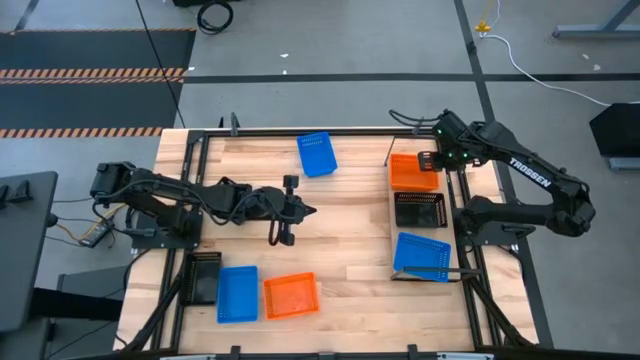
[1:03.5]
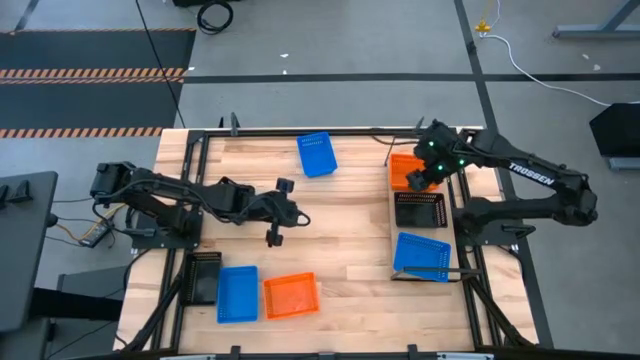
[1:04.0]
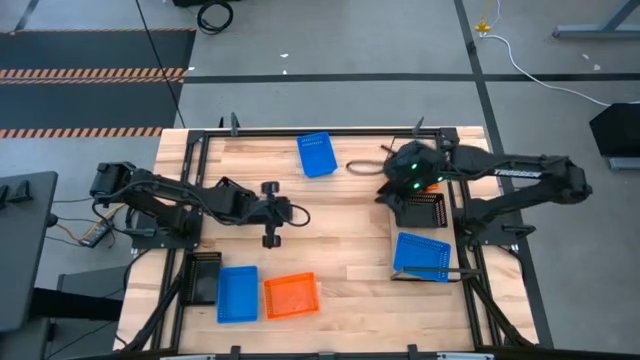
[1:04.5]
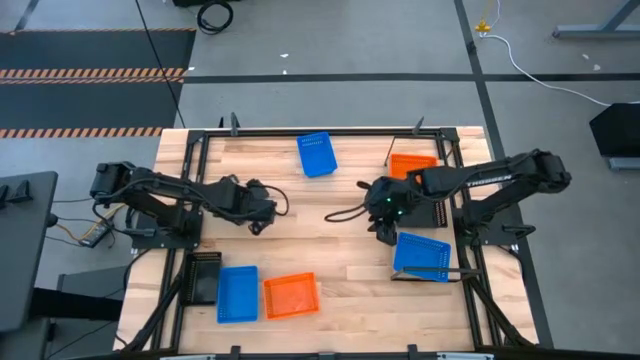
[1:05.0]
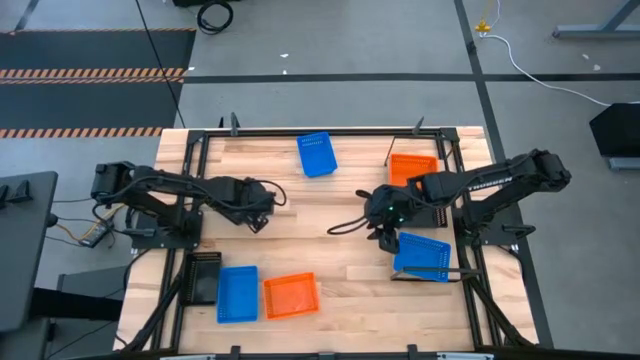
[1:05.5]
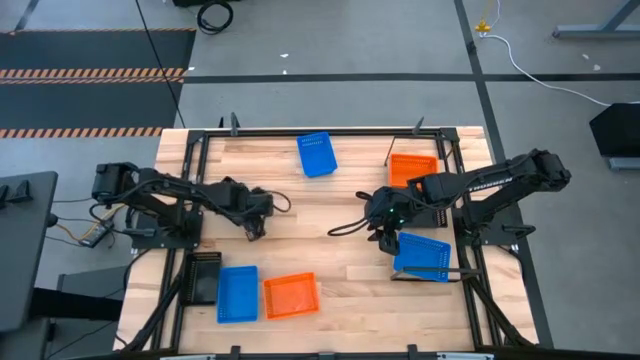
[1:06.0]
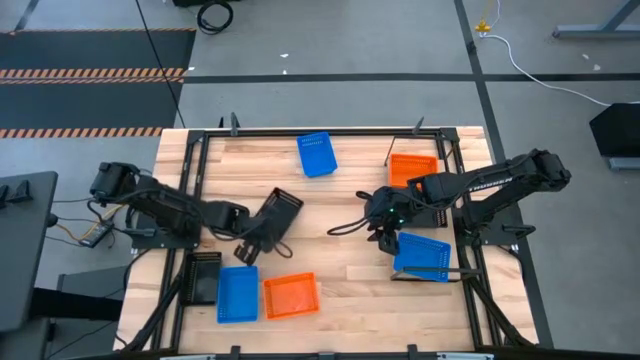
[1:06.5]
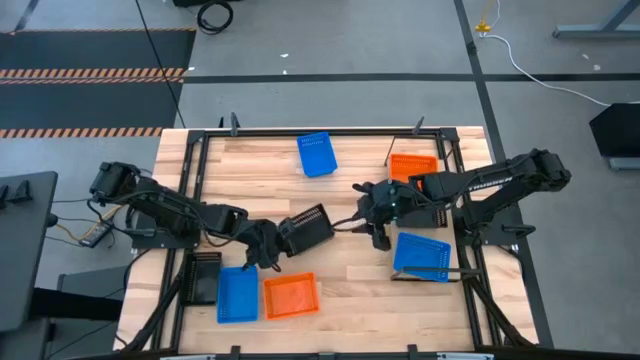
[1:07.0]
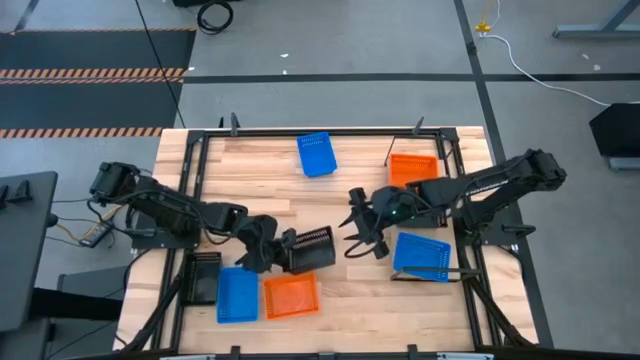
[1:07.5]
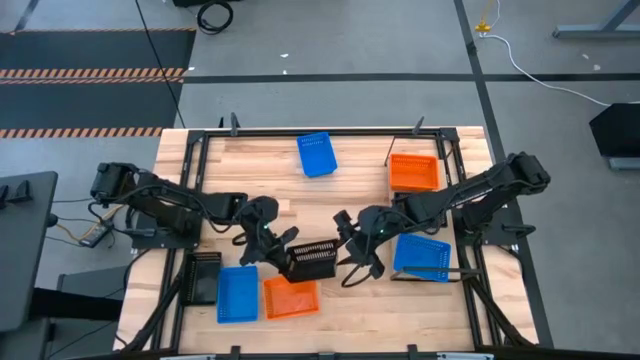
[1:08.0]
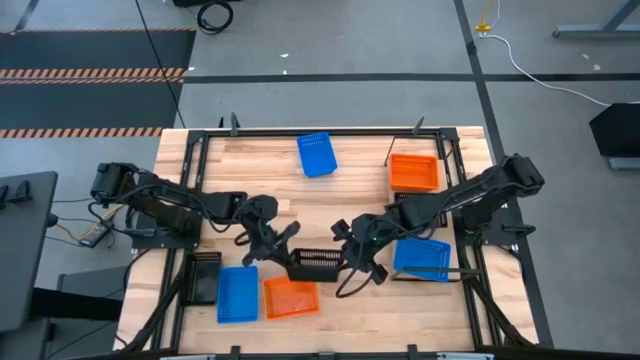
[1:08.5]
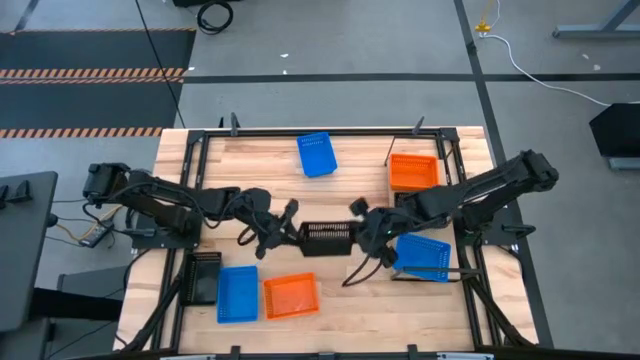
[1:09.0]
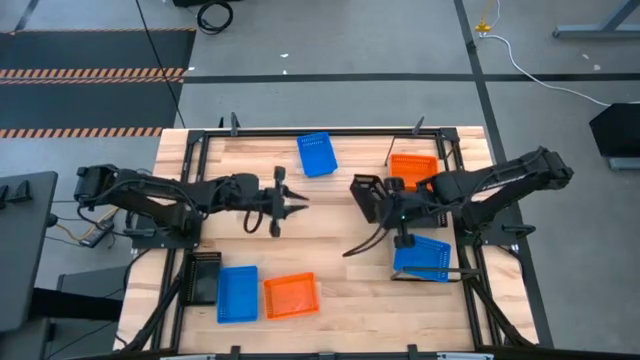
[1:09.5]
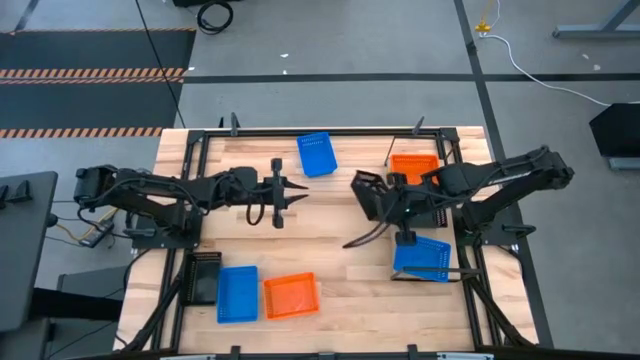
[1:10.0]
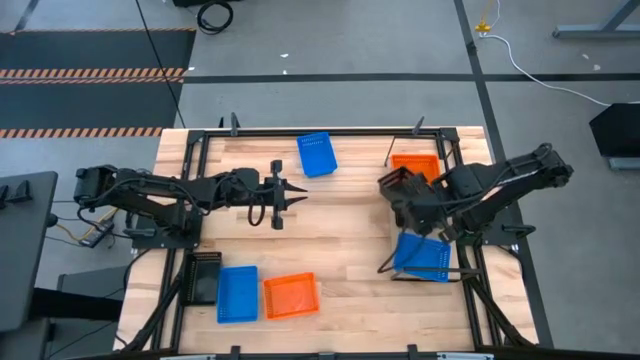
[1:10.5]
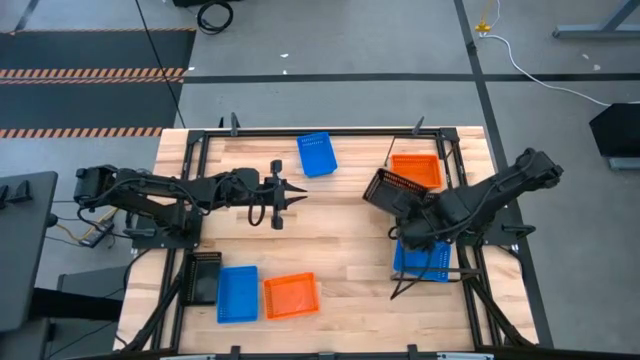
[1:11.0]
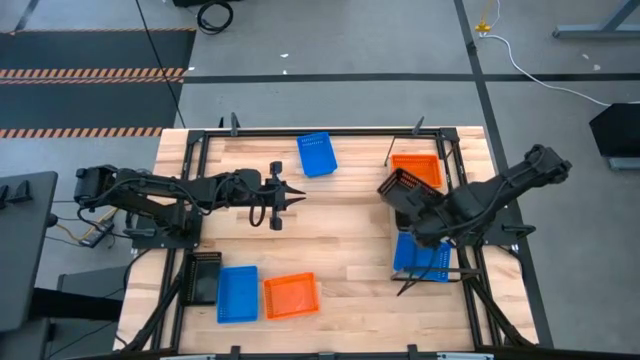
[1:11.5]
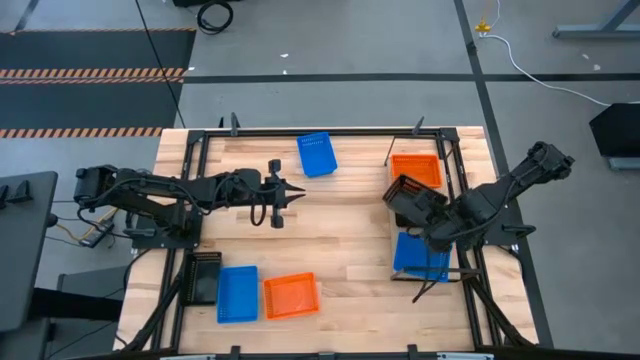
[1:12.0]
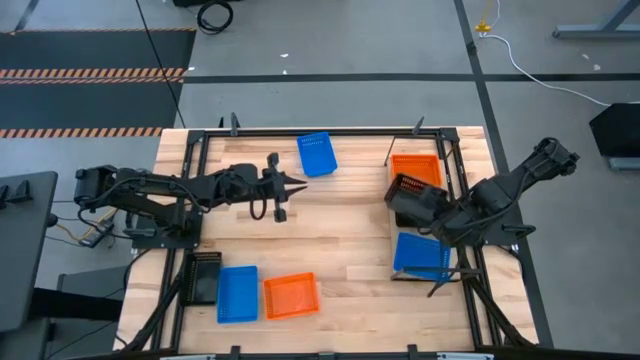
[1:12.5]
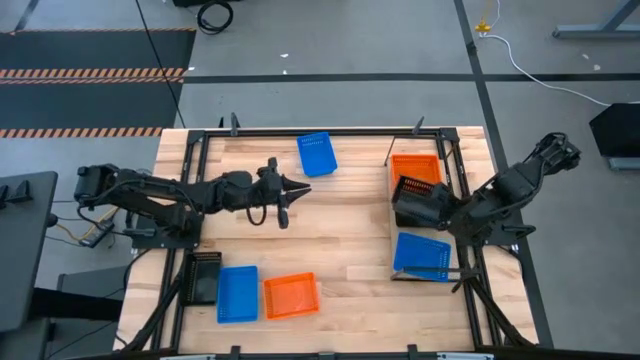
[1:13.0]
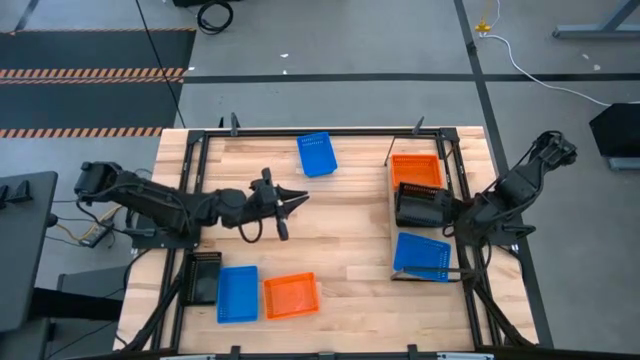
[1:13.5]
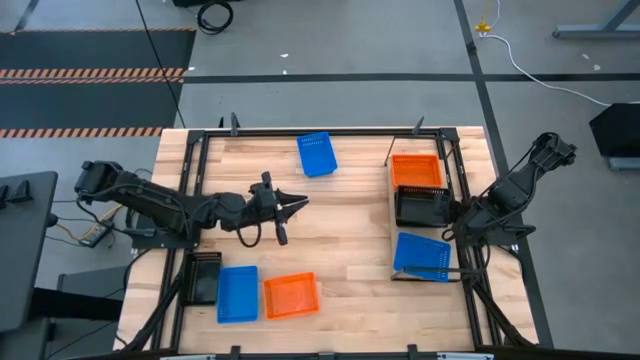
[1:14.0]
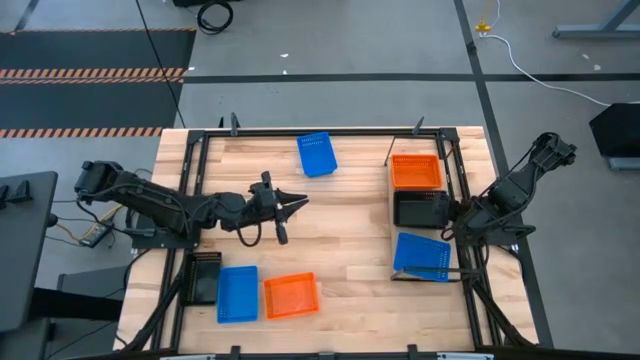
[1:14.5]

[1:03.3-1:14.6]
Task: Stack baskets on shelf by color
Stack the top black bin on top of the black bin on the shelf
